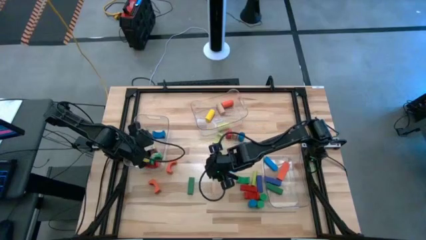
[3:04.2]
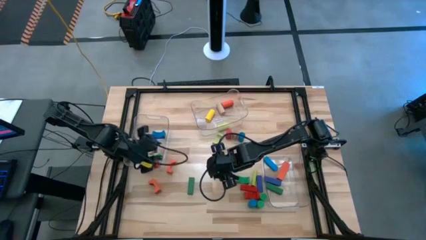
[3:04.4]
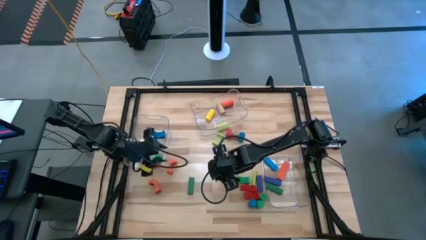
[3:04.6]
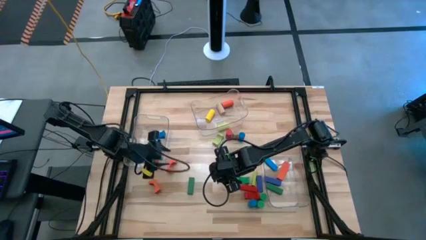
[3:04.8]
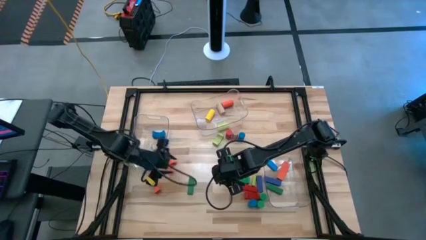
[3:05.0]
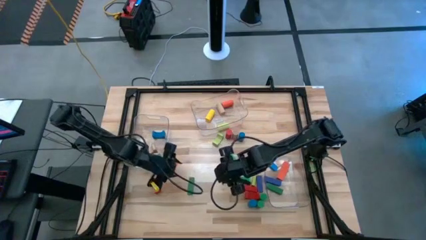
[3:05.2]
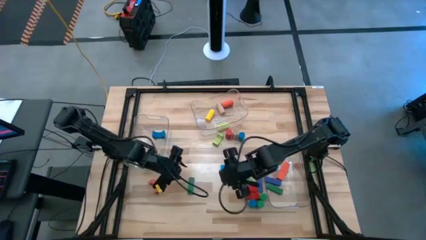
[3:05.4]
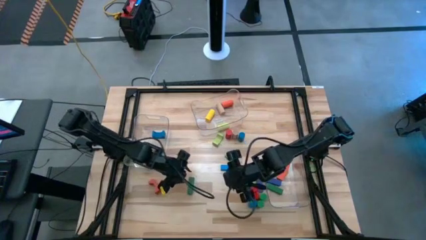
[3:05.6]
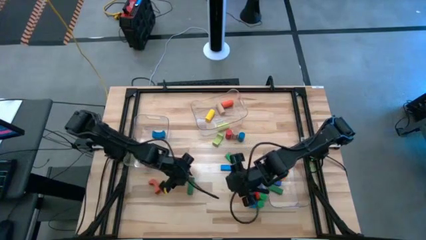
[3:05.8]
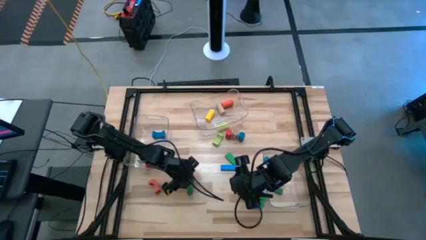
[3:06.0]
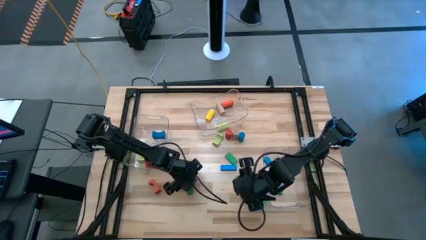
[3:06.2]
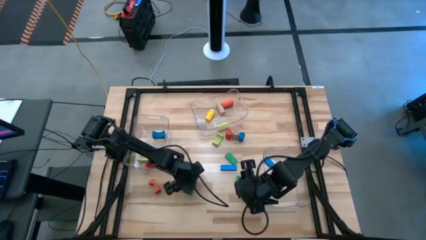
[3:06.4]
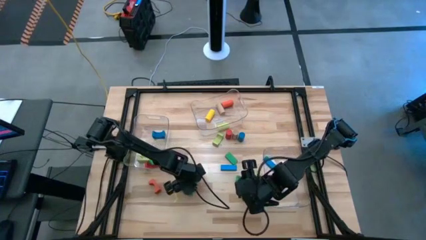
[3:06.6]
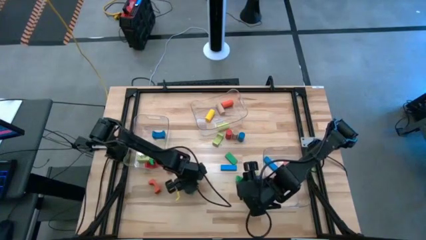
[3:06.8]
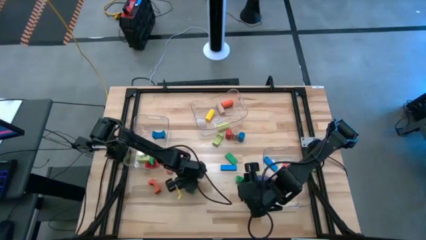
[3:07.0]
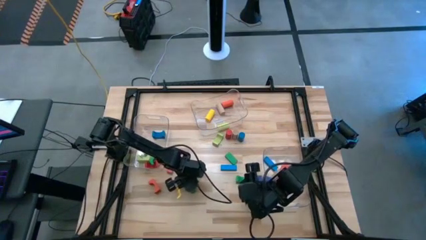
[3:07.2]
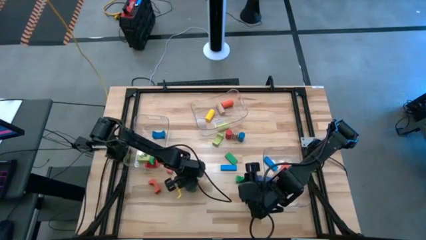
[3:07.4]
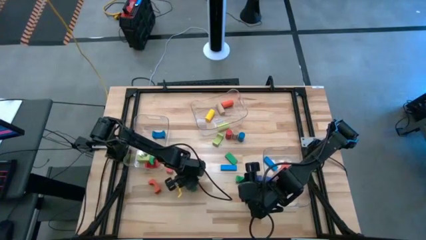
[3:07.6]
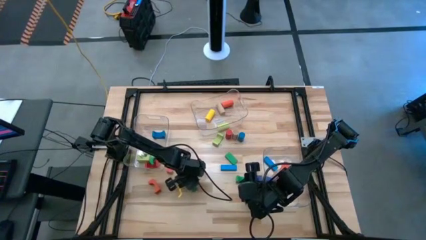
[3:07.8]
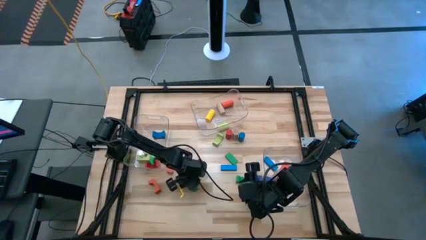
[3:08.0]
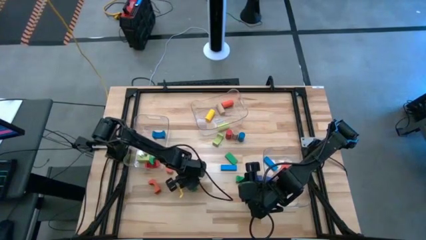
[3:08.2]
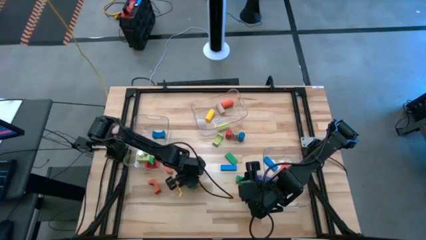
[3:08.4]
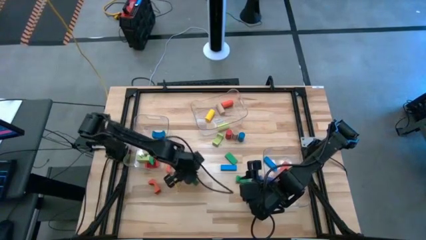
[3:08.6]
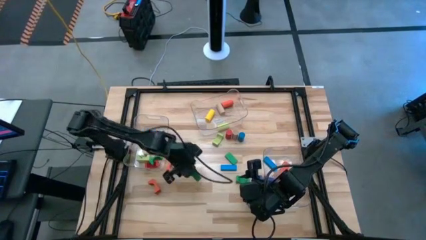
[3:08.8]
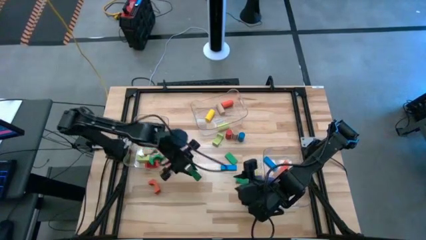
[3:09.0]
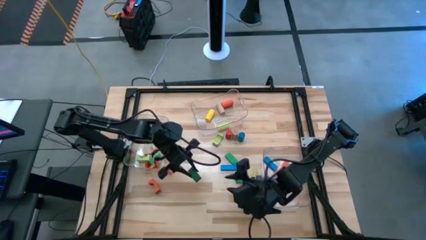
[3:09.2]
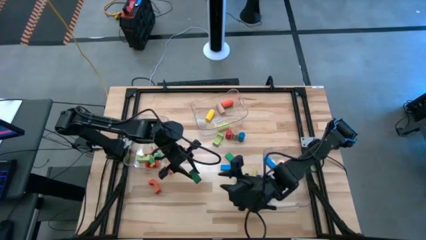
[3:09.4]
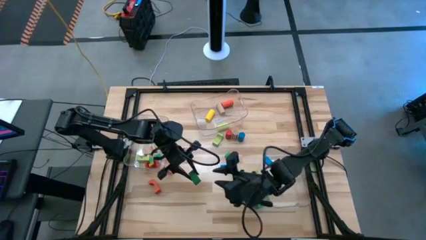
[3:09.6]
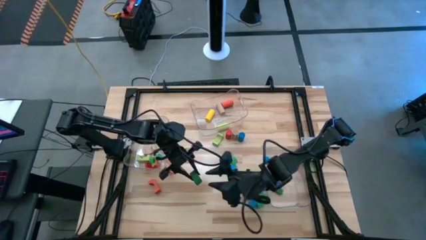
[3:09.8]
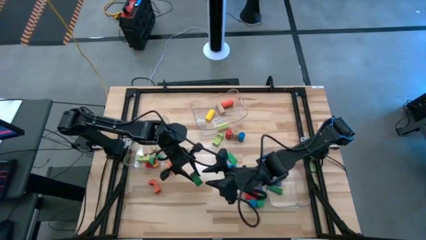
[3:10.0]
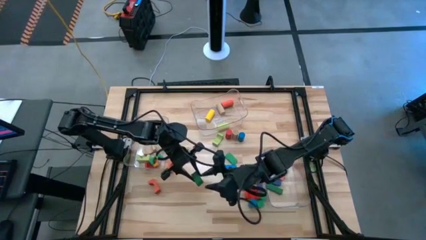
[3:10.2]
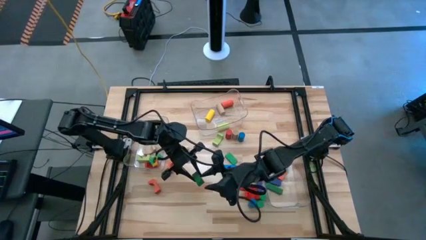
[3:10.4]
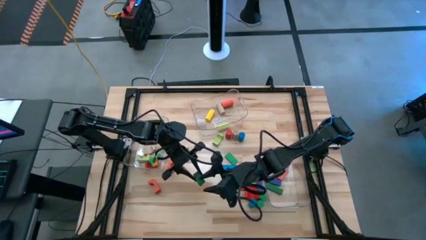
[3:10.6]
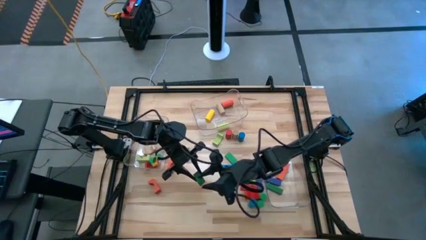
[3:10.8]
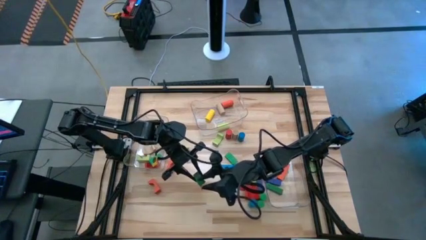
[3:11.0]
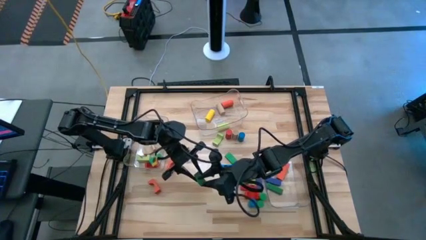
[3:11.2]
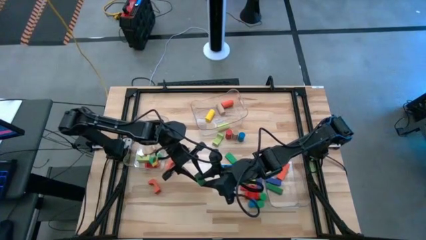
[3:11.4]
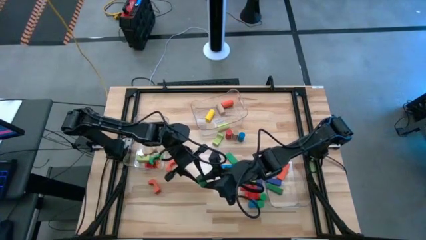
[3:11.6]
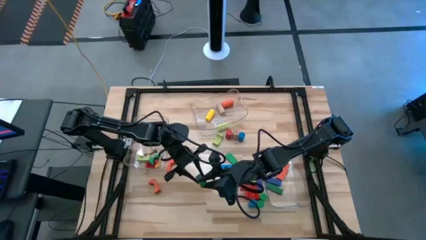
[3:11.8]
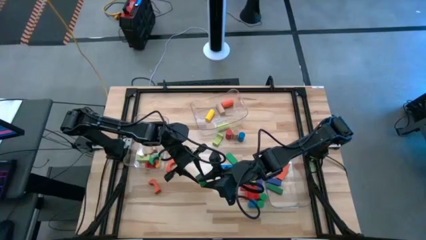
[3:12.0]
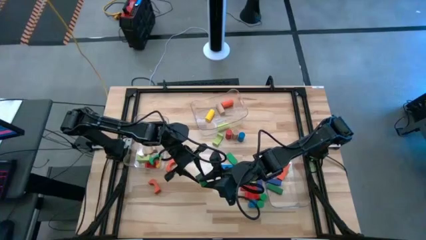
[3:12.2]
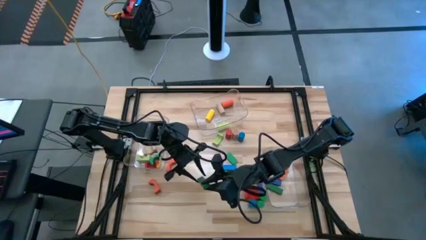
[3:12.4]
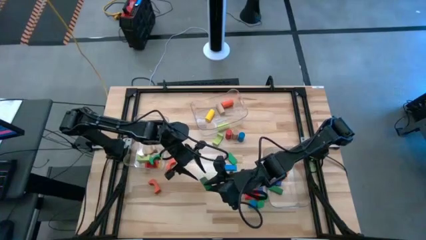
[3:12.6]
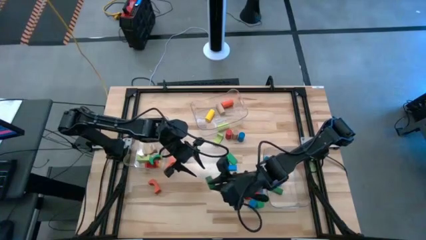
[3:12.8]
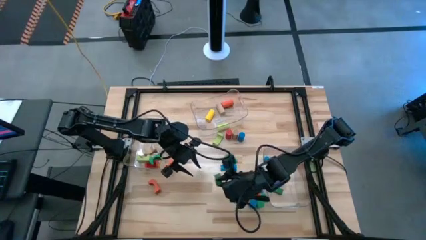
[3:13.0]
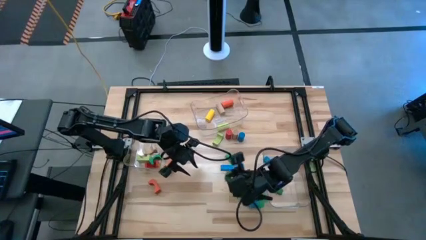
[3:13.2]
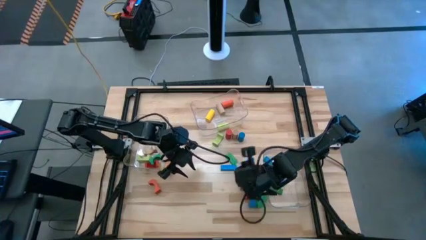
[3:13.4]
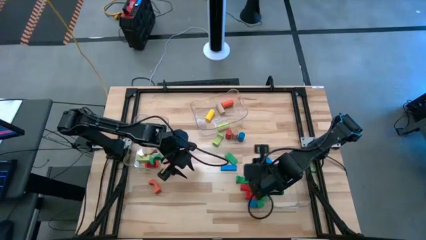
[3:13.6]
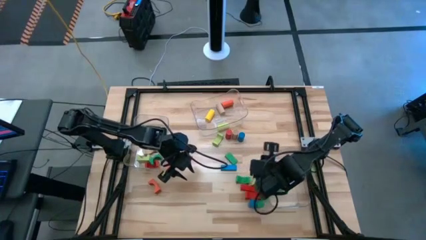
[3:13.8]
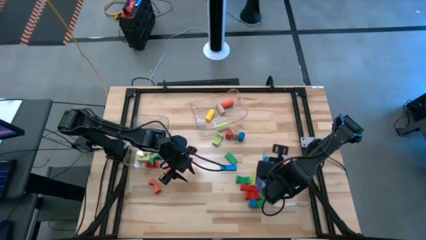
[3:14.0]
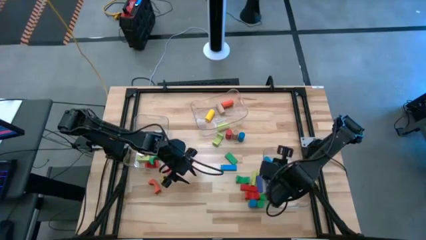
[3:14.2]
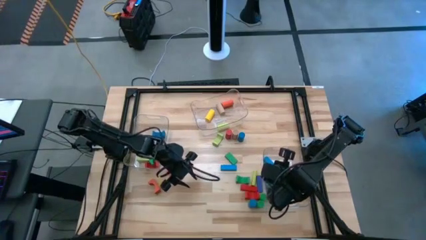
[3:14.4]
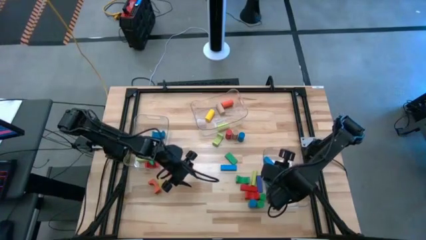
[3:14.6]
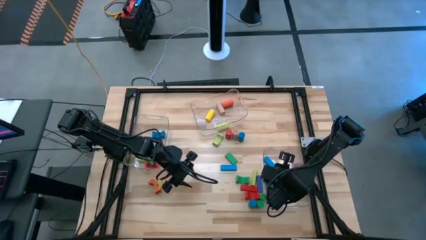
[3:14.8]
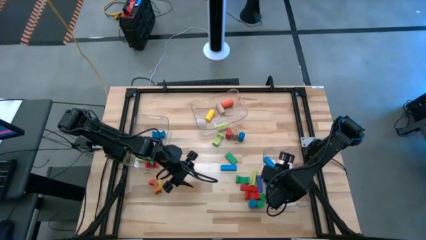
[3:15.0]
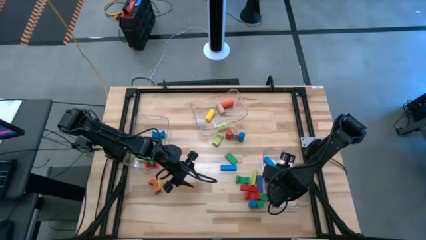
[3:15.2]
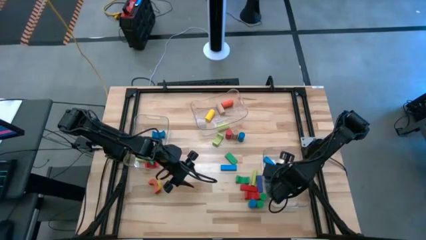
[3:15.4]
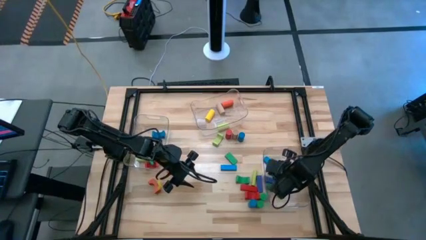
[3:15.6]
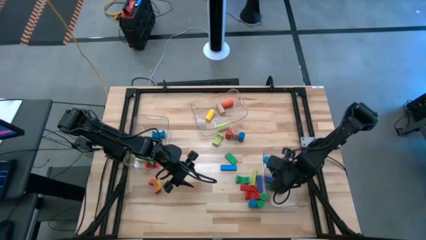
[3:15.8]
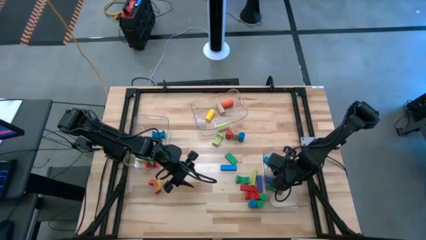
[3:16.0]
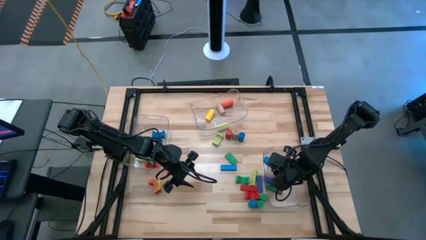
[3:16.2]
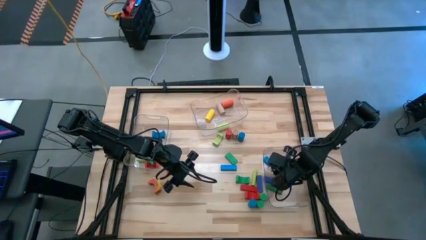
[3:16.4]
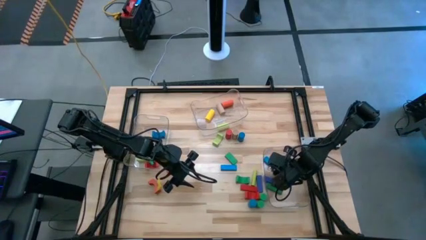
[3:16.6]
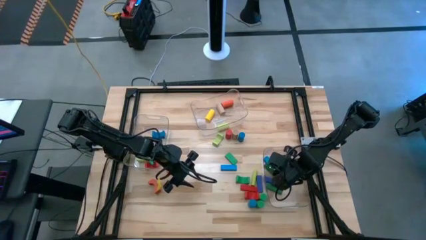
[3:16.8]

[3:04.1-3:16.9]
Task: Sort blocks by size
Put the green rectangular block into the right transparent bin

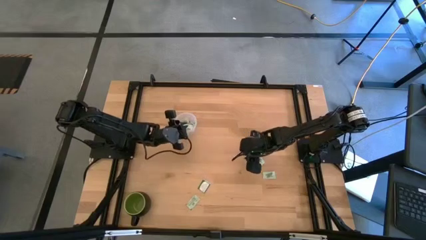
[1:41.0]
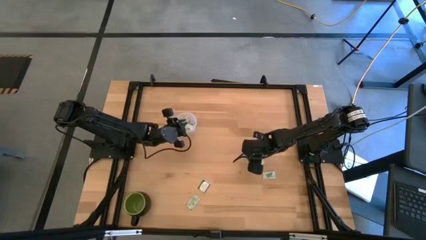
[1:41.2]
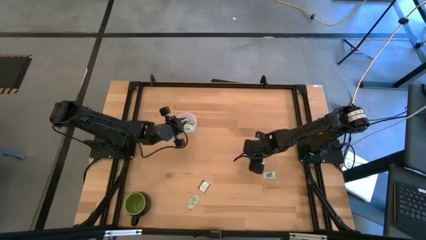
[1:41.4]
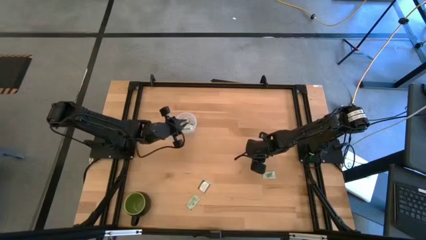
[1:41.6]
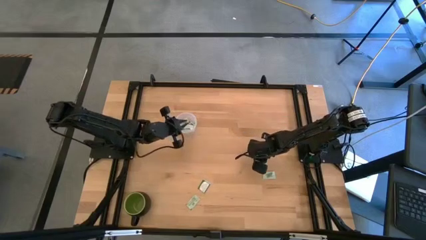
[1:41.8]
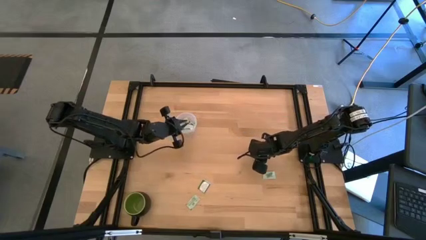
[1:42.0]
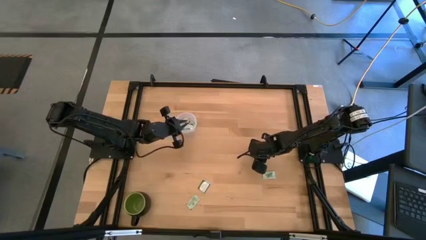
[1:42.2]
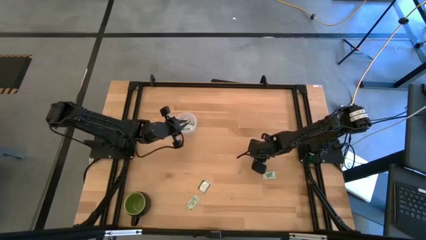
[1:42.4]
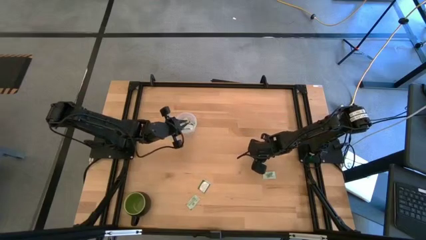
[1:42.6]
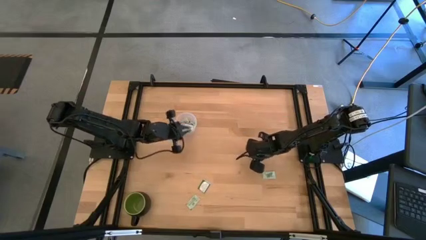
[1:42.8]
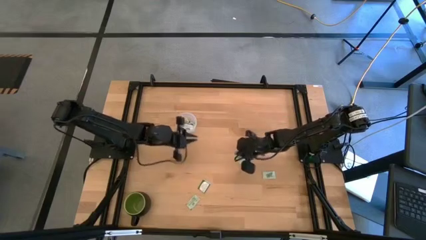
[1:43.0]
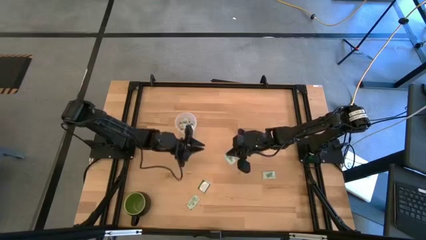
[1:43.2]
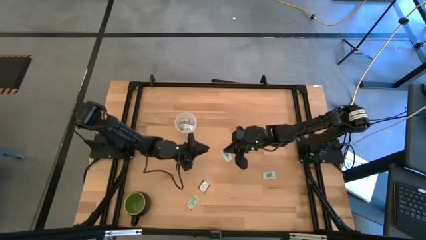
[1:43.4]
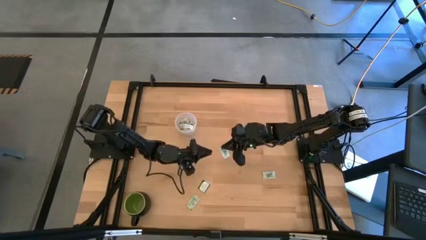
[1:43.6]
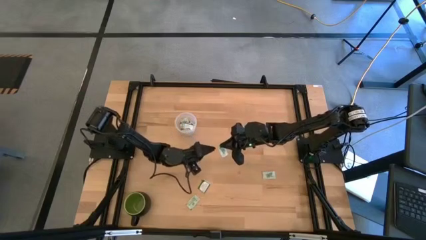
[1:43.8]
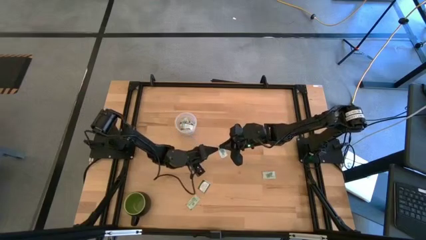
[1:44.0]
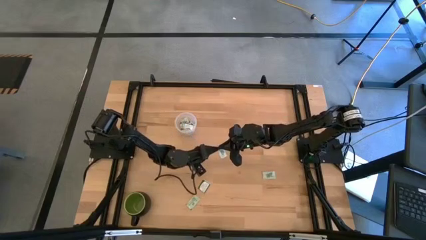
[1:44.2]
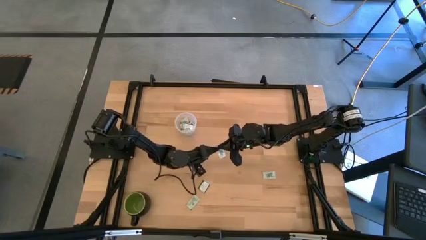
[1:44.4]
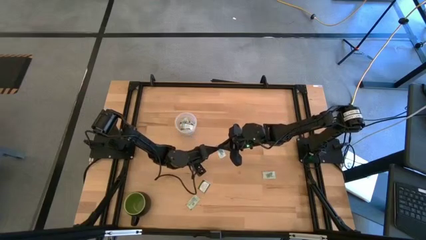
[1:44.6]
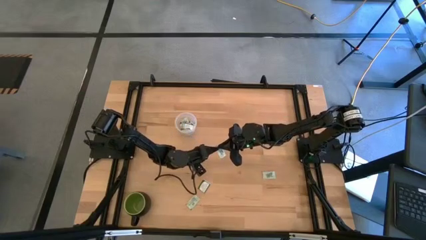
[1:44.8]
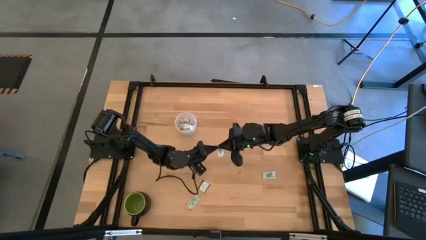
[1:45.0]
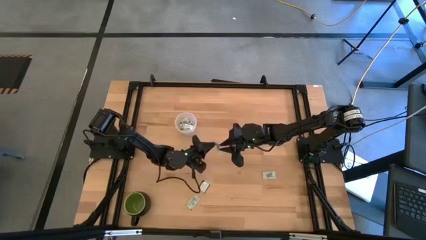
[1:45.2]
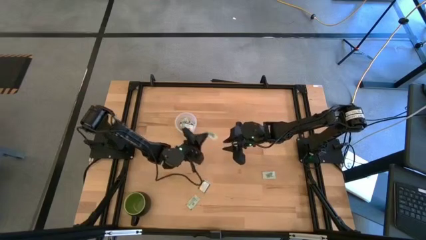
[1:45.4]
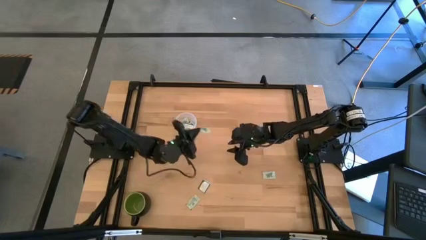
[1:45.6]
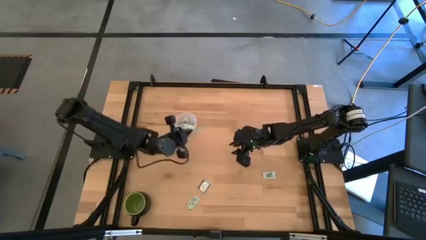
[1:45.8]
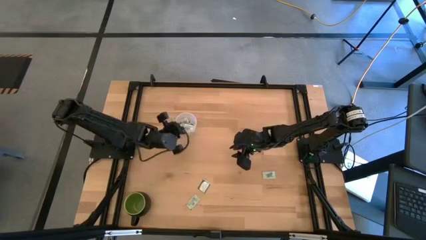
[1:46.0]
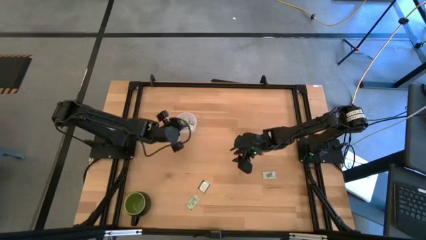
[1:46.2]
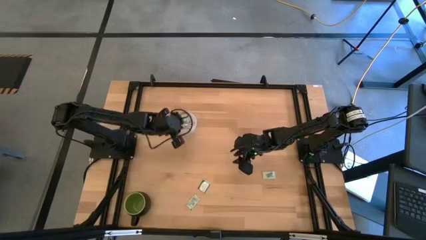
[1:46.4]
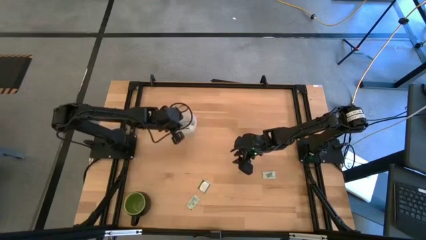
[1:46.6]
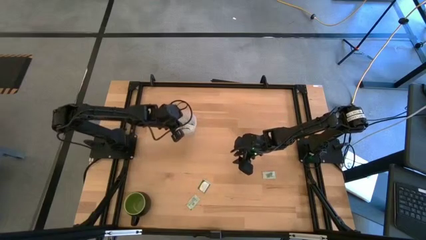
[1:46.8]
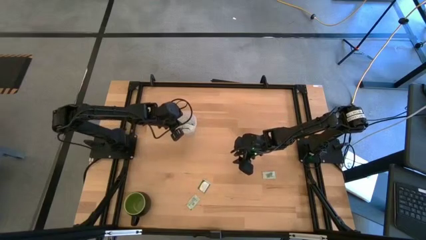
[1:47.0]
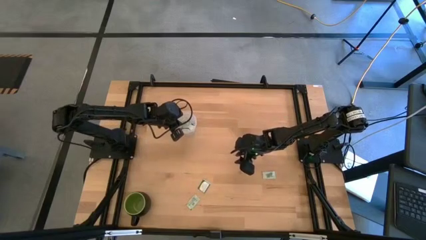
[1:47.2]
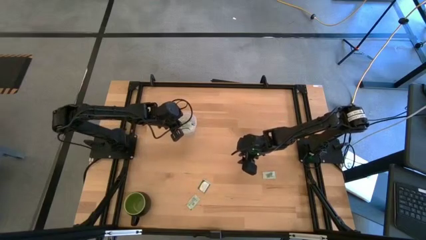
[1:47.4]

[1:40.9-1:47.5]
Task: Pick and place Stevia / Truvia into bins
Put the light green stevia packet into the transparent container
